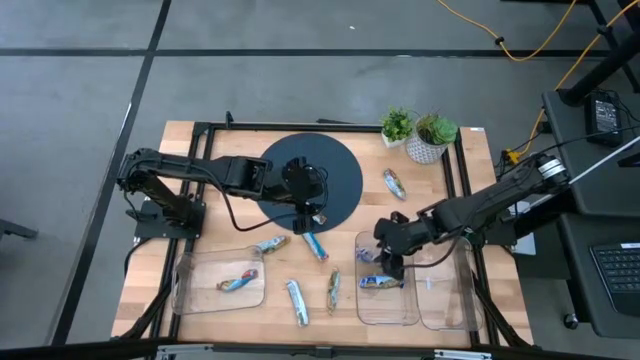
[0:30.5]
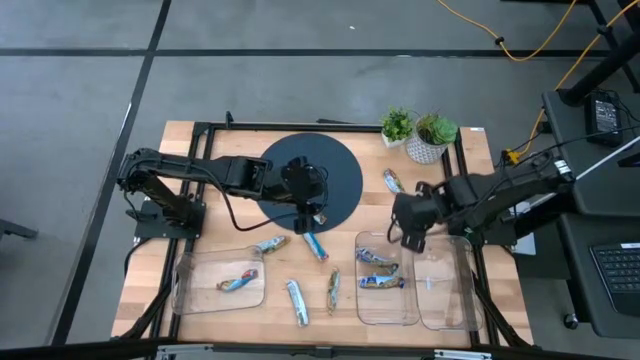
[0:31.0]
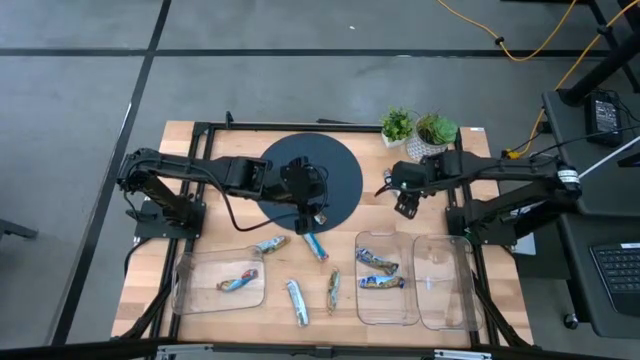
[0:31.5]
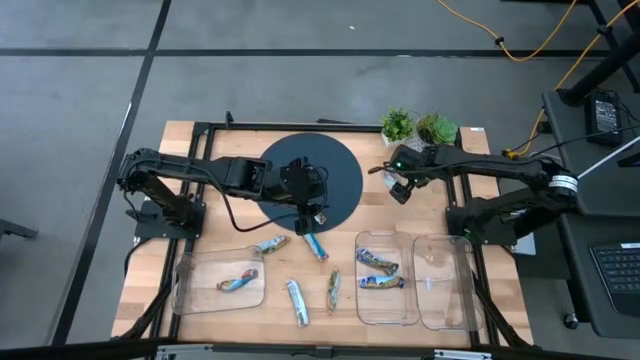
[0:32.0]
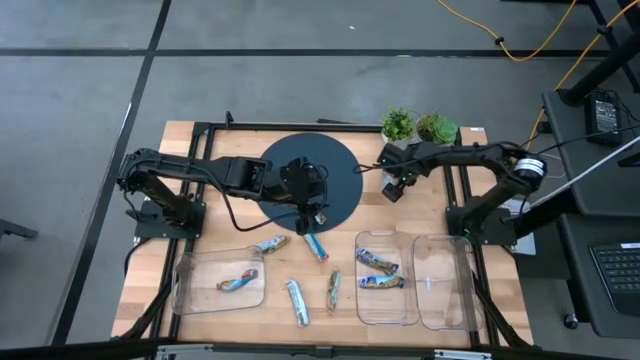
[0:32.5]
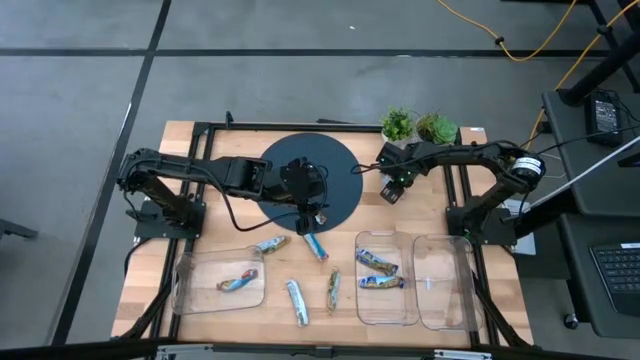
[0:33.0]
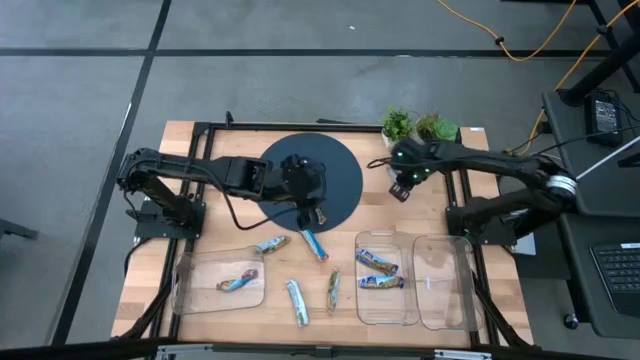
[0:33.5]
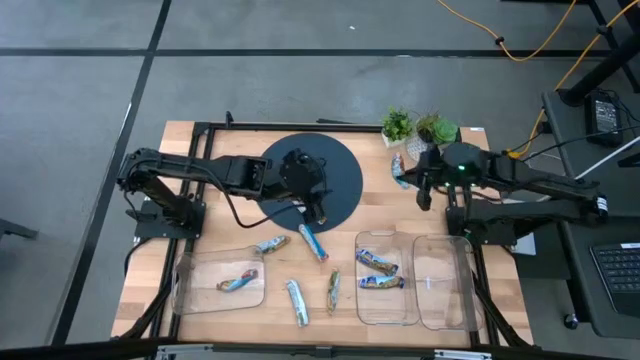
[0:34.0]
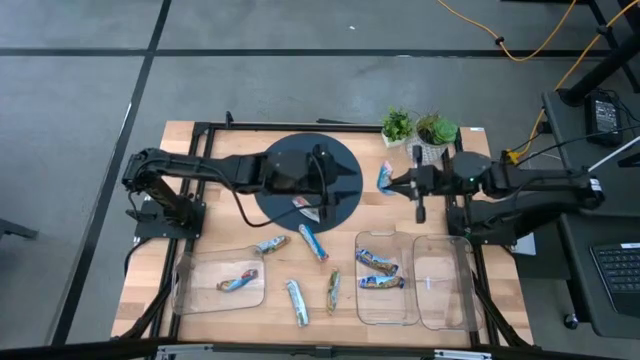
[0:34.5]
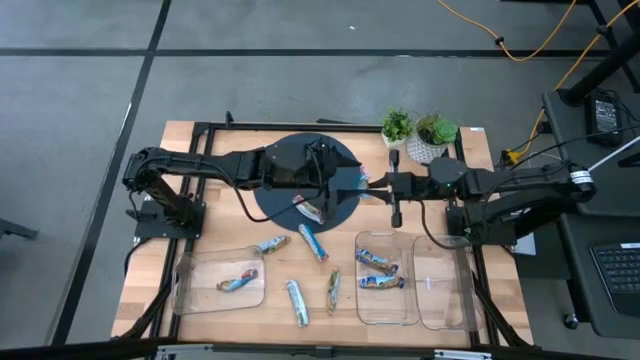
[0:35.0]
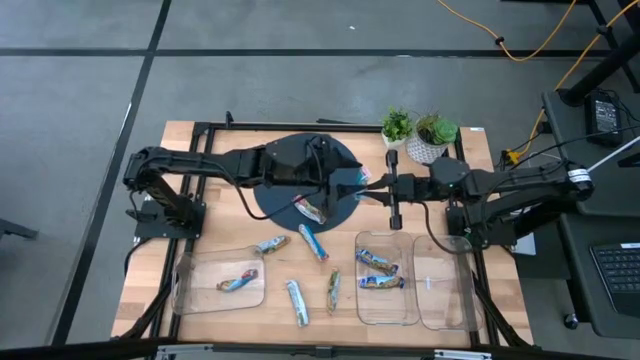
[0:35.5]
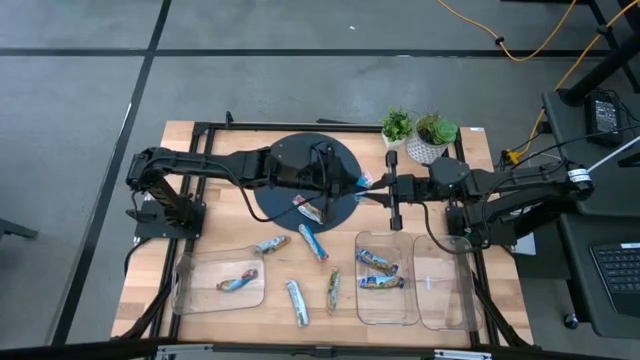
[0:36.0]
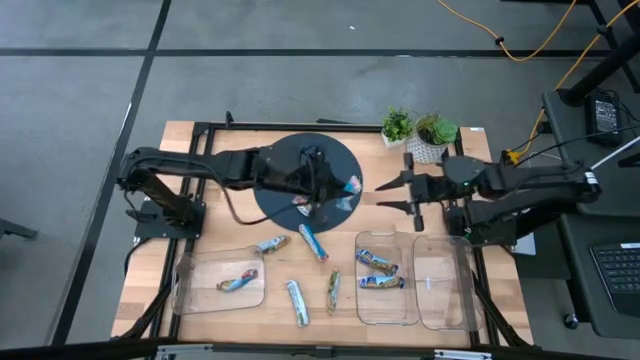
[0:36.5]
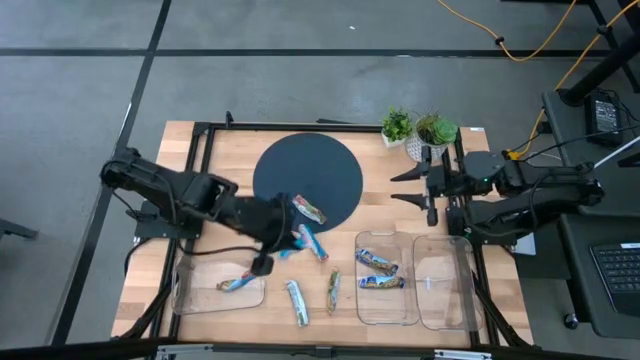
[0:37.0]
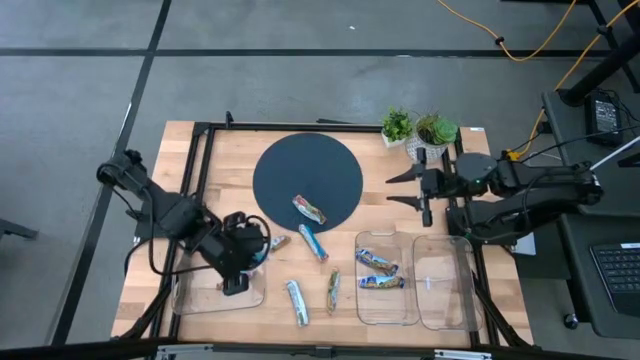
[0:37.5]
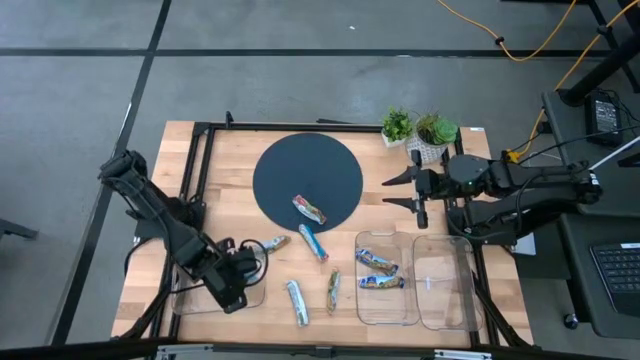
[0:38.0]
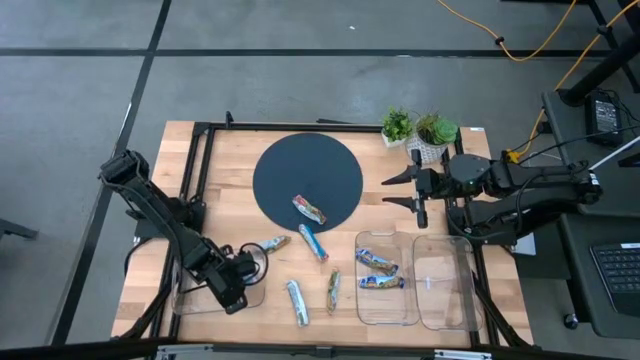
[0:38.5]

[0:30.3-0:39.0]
Task: Pick and place Granola Bars by type
Put the red granola bar into the left transparent bin

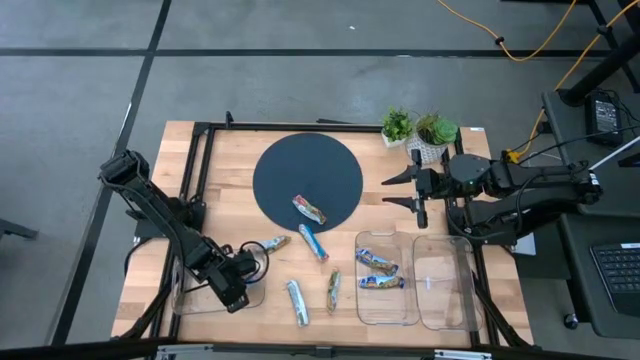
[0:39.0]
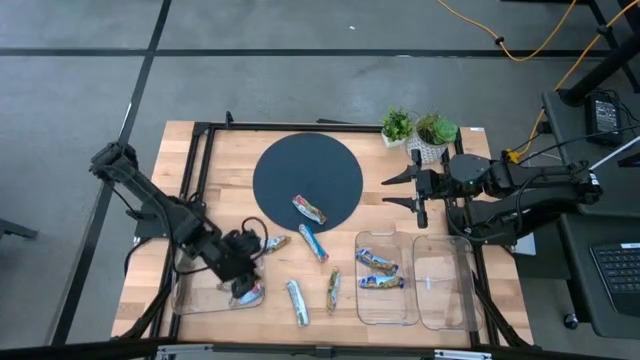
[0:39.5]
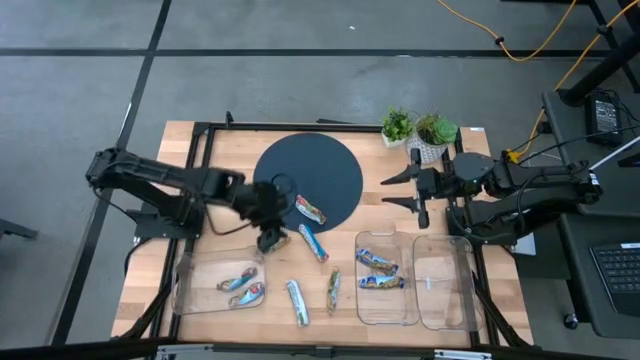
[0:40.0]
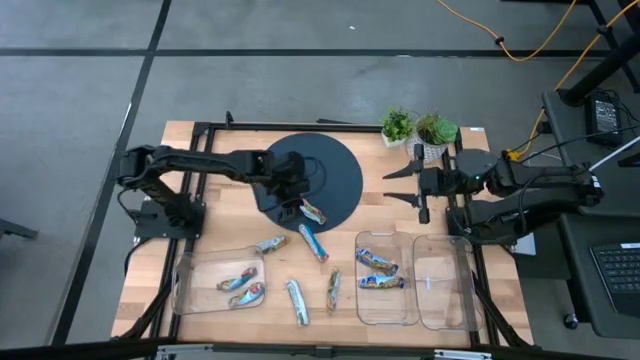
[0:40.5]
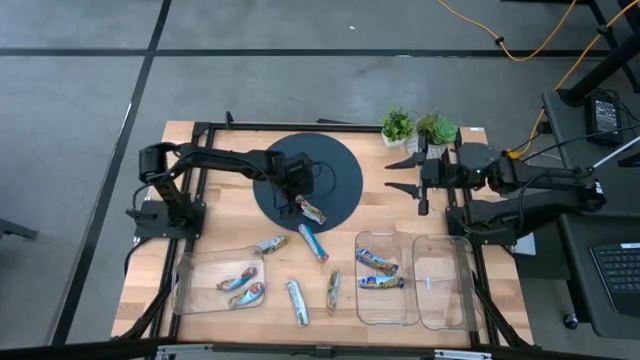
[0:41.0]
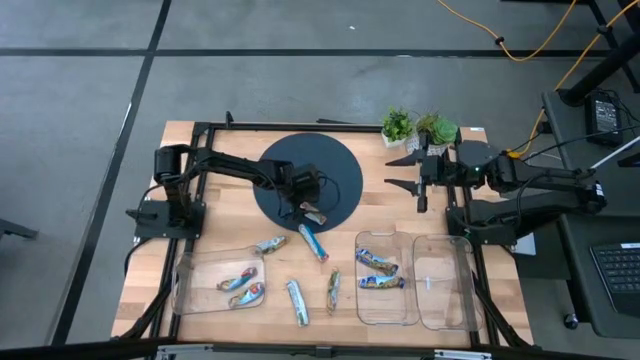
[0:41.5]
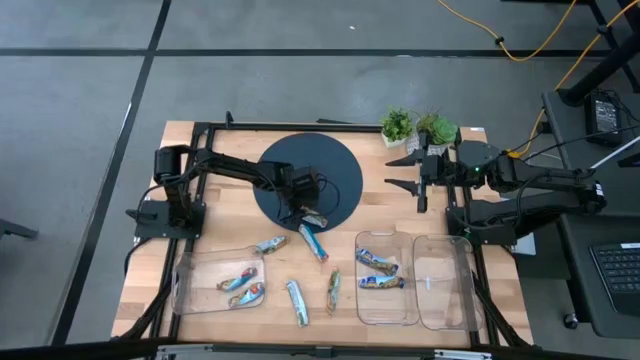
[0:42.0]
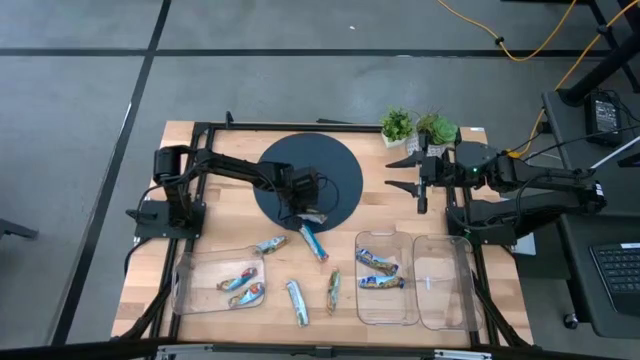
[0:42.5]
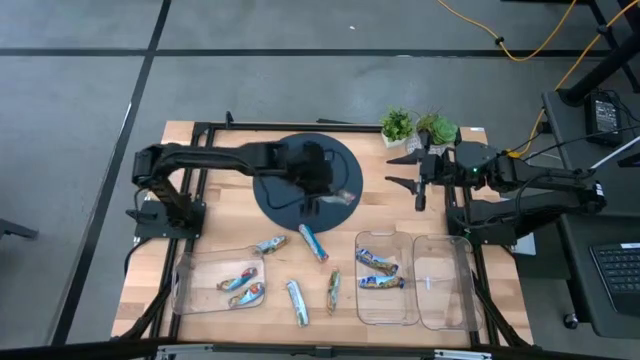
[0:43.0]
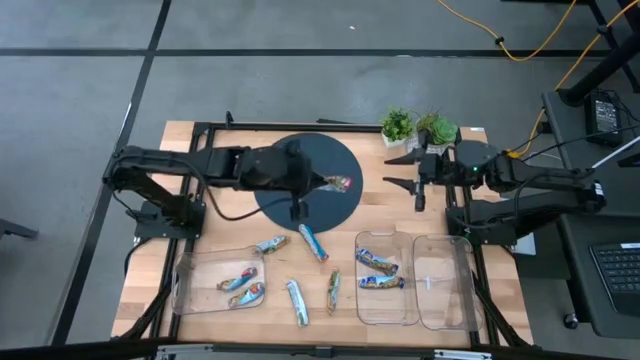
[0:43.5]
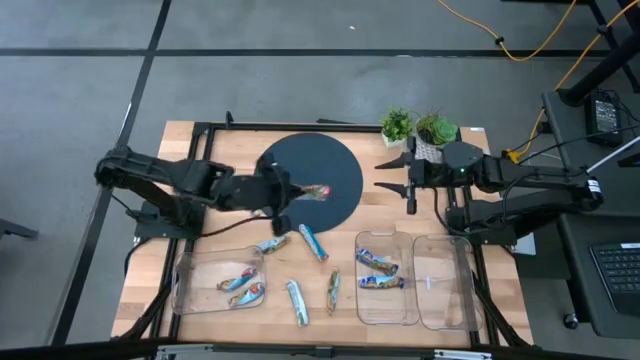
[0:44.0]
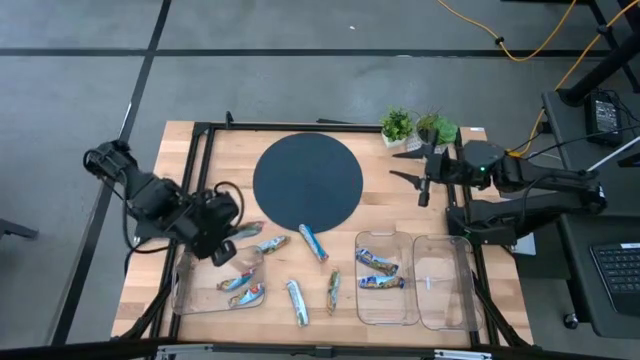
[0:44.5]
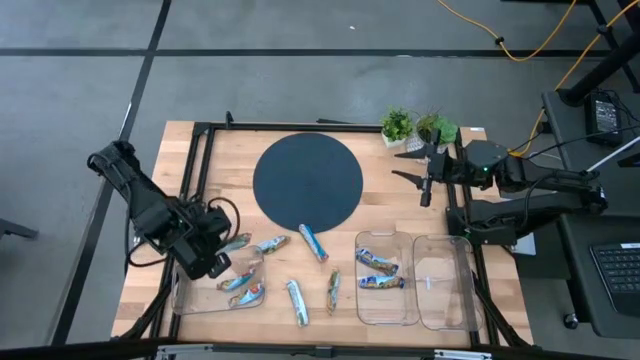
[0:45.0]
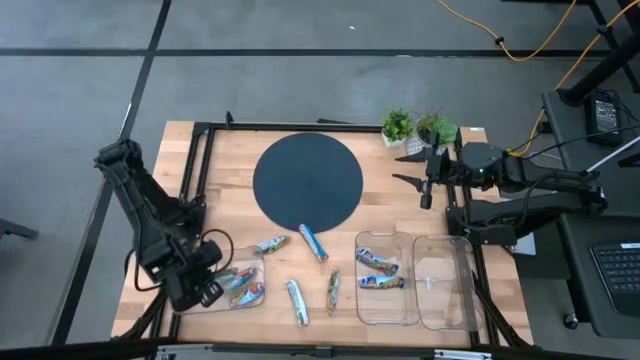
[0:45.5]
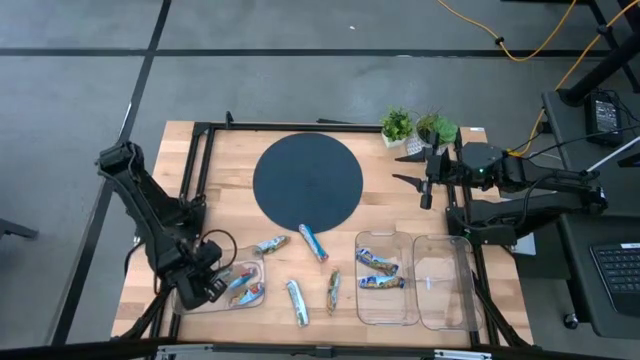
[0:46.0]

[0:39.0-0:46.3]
Put the red granola bar into the left transparent bin

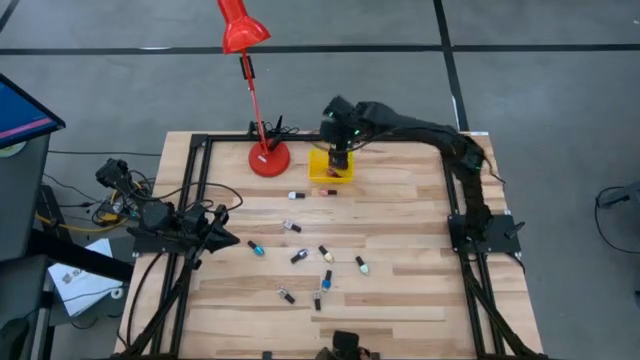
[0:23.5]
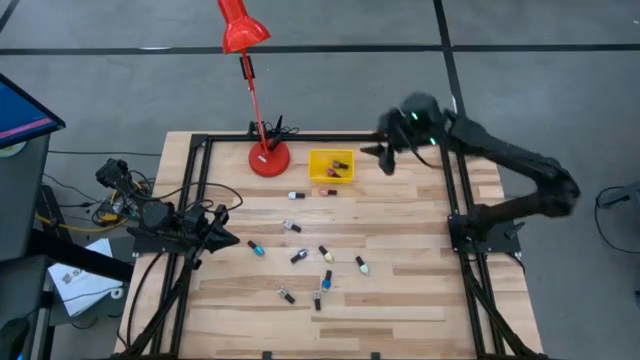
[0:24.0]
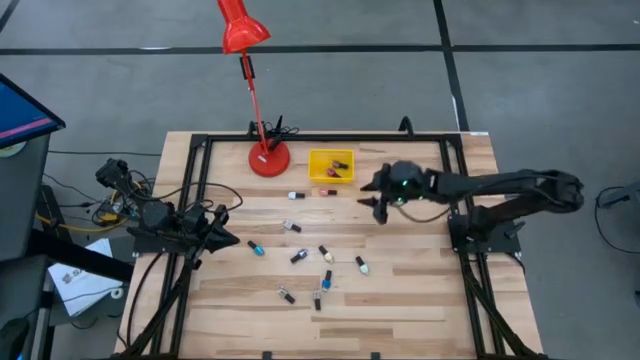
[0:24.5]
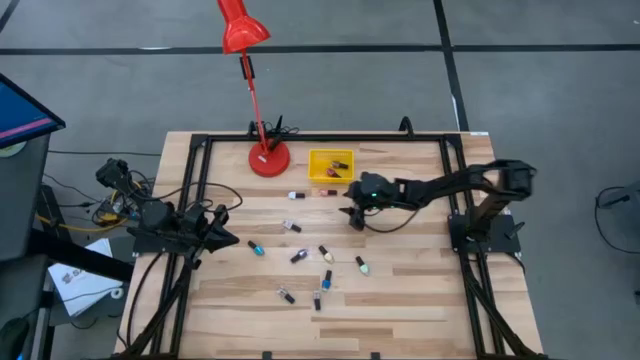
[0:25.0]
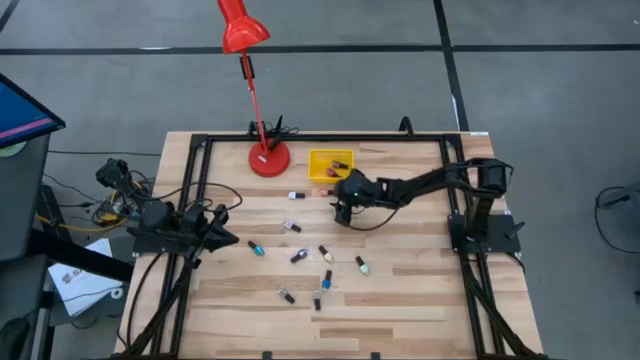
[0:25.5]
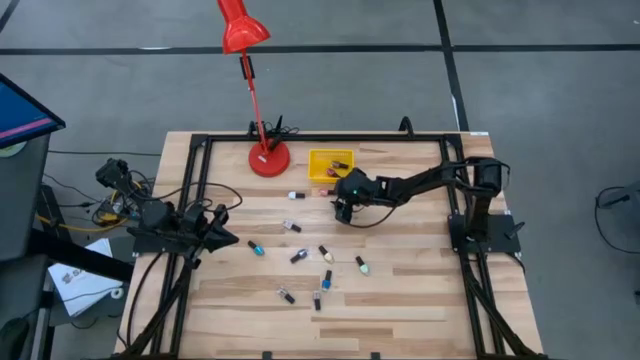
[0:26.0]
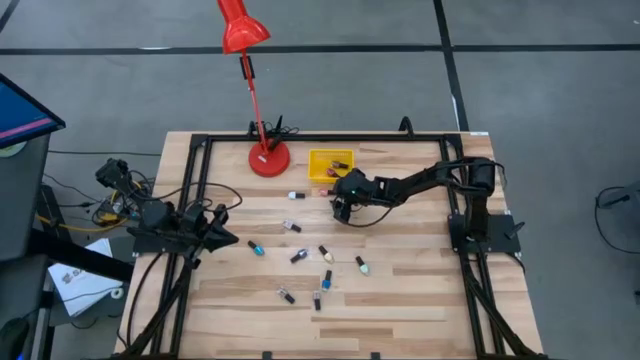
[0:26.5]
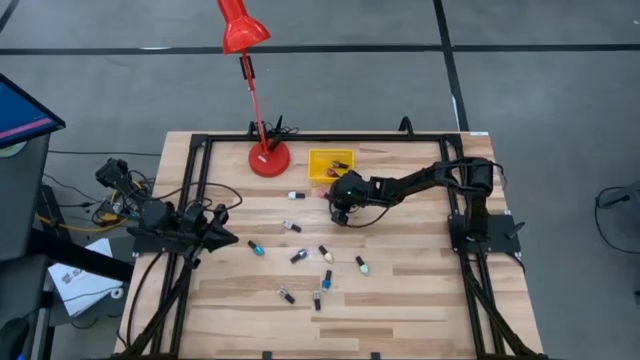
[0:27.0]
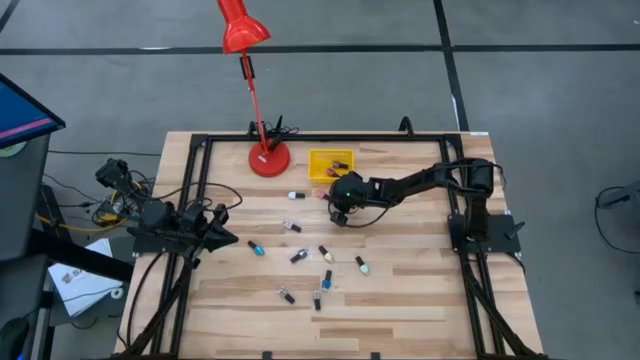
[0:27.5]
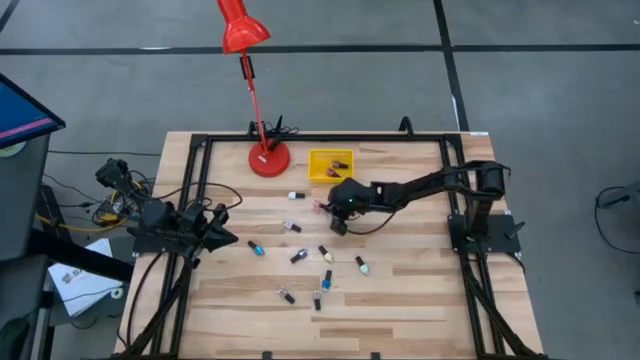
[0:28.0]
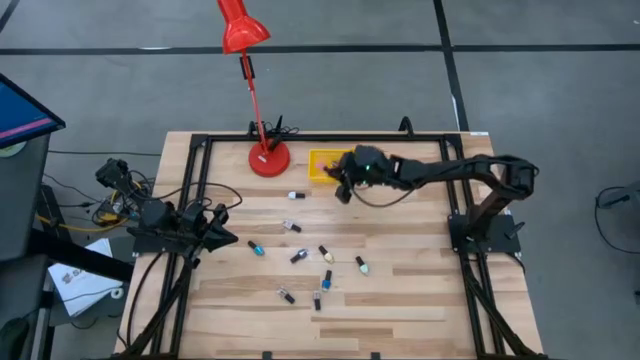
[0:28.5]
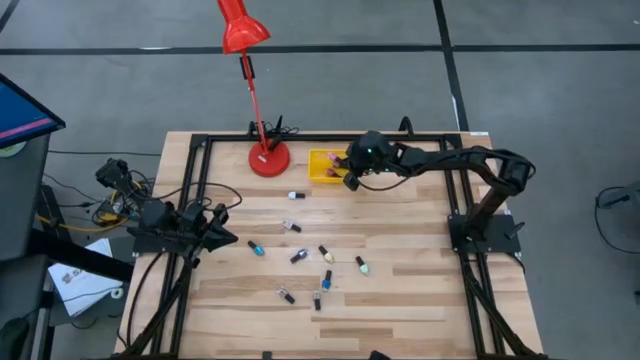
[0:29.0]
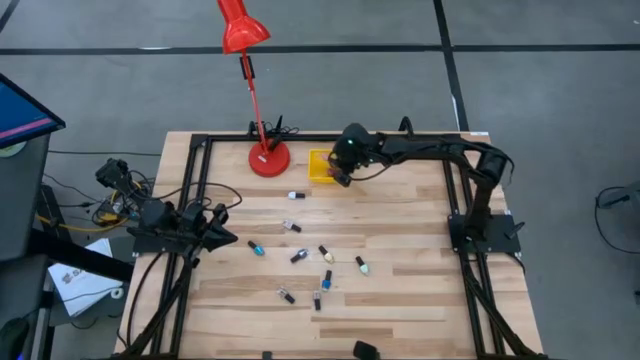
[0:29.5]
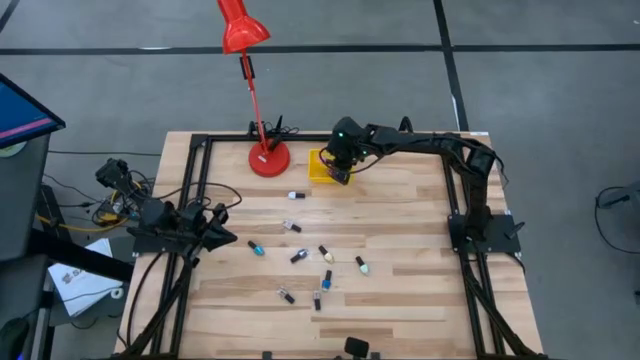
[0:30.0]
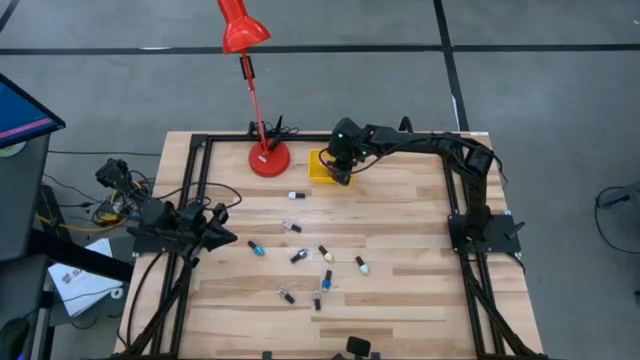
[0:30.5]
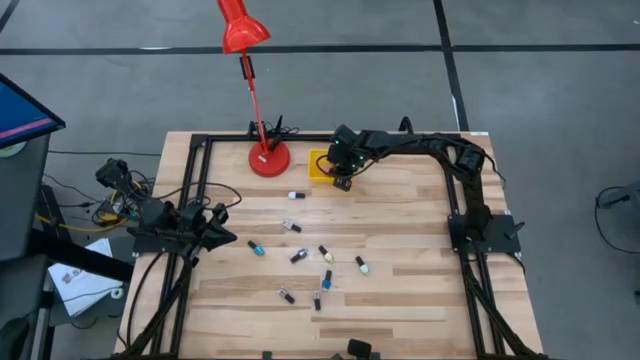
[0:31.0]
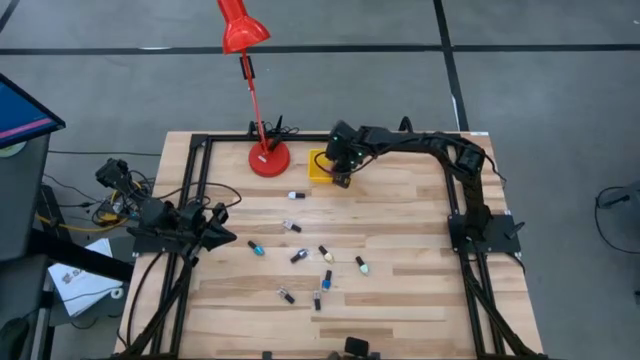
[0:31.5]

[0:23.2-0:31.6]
Task: Pick & Place Nail Polish
Put the pink nail polish bottle into the yellow bin
